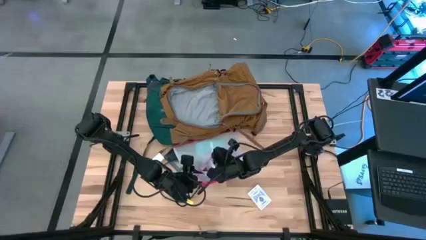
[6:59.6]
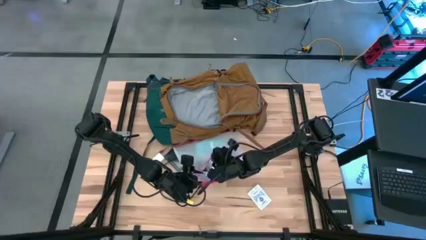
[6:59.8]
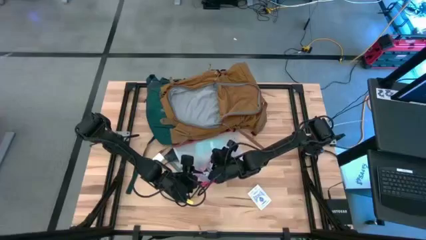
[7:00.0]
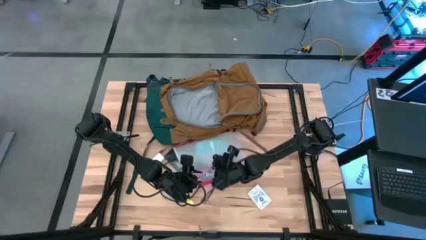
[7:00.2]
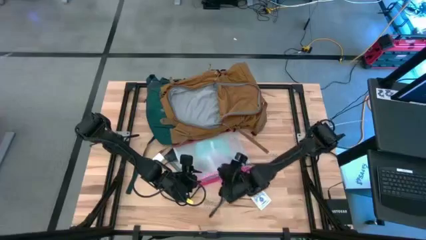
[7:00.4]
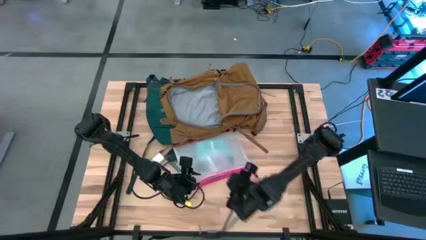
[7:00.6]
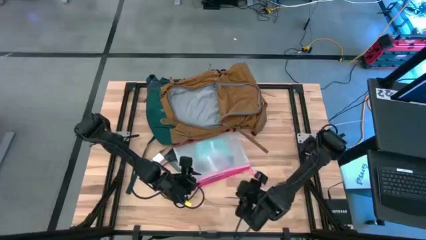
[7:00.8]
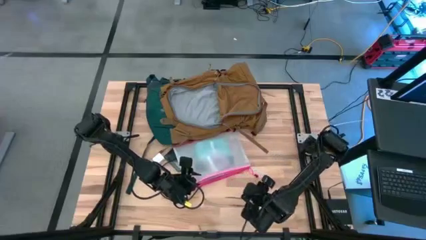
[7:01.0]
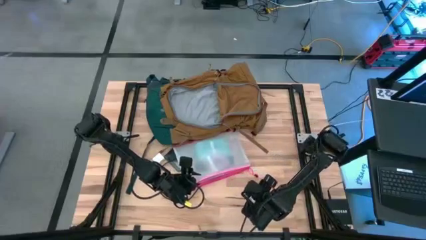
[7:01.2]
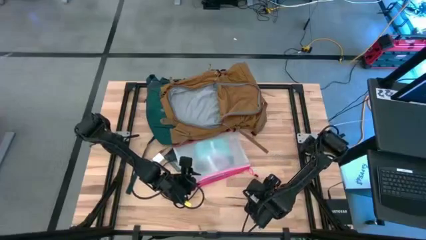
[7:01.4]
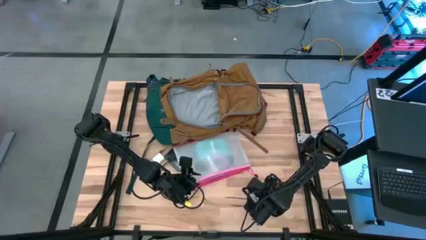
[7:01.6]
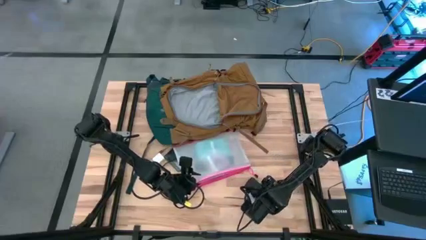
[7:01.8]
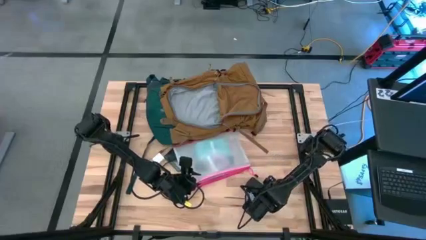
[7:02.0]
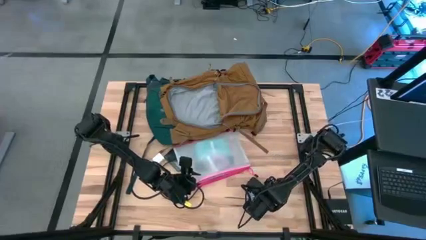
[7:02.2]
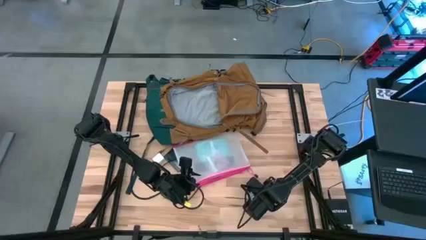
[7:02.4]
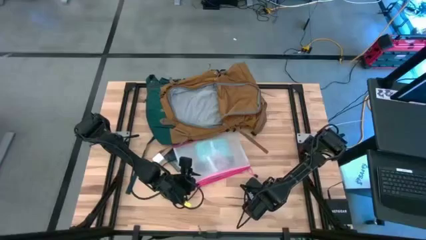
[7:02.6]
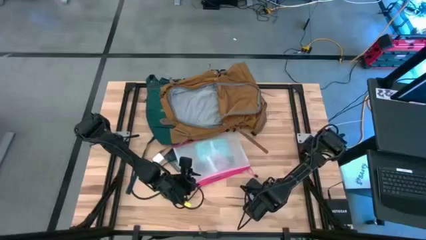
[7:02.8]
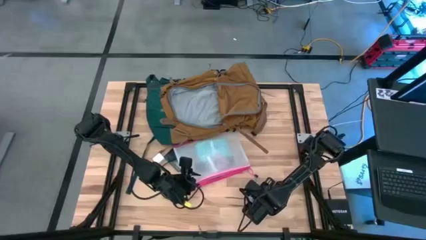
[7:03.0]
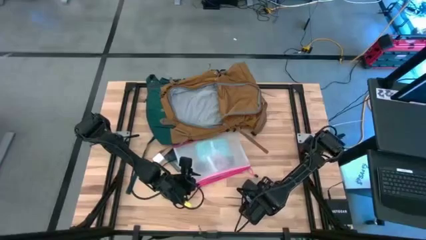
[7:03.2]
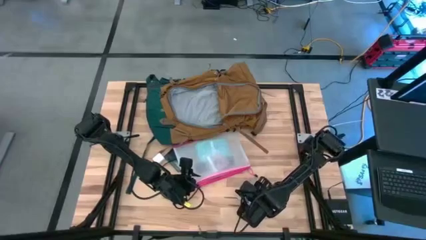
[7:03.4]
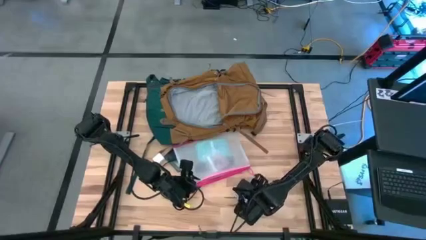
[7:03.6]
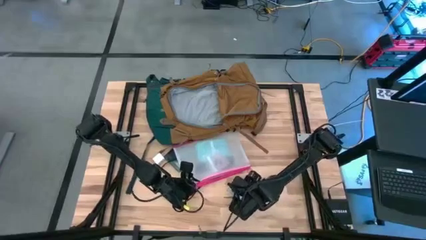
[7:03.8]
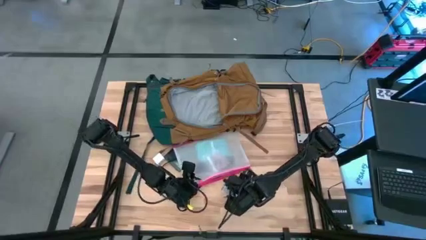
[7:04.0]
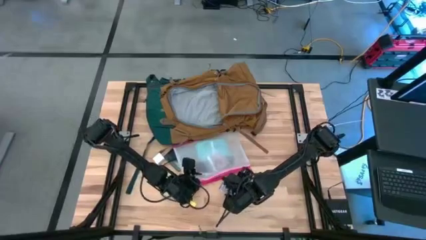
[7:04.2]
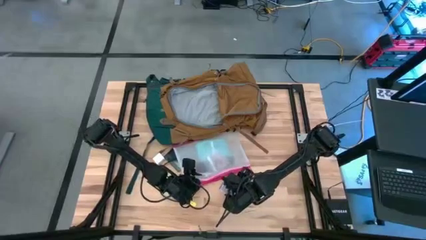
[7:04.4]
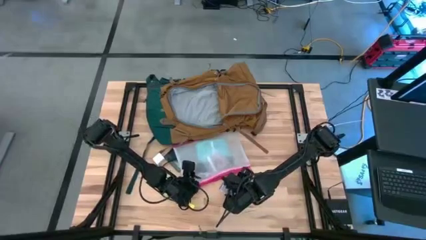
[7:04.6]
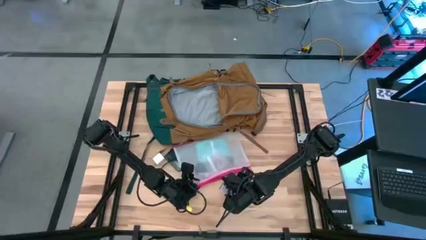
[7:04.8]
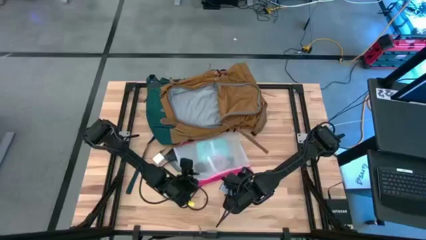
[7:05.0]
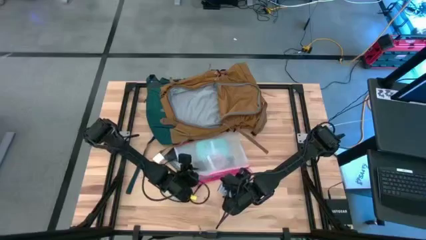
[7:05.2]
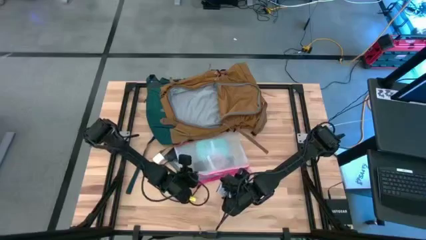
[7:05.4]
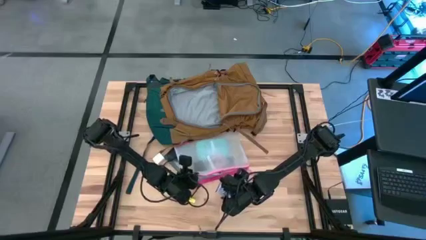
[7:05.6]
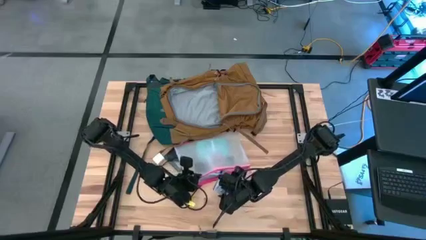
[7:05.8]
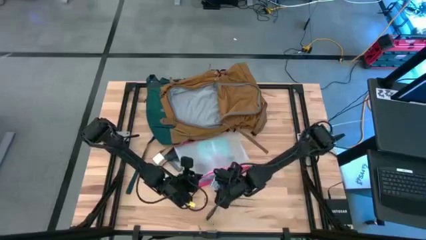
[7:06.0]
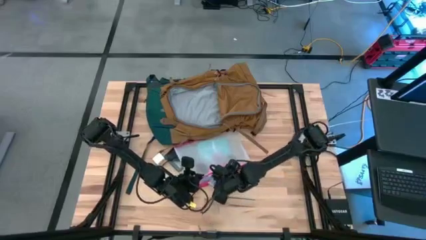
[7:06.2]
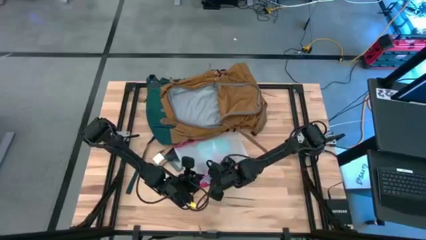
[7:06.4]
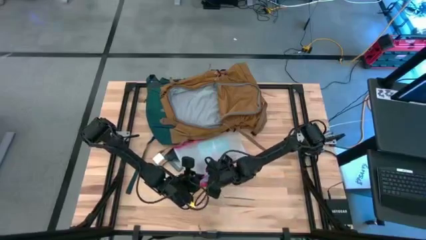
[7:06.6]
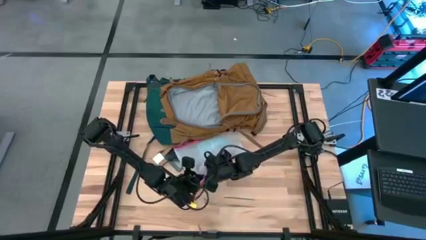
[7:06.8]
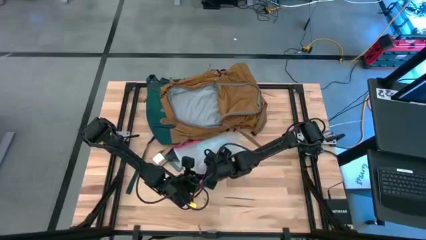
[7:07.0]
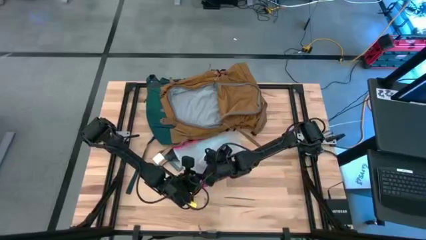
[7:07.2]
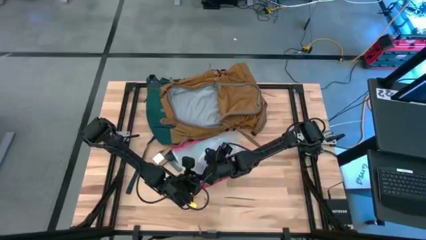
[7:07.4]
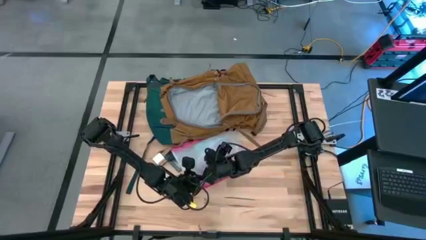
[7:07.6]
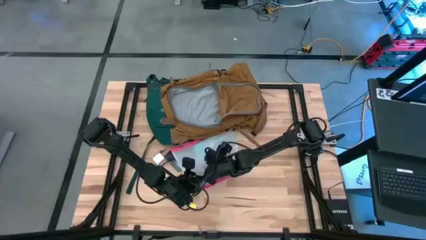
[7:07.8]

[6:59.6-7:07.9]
Task: Unpack backpack
Put the blue playing cards into the pink zipper pouch

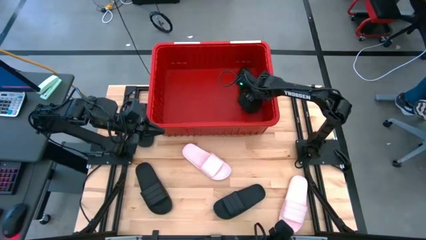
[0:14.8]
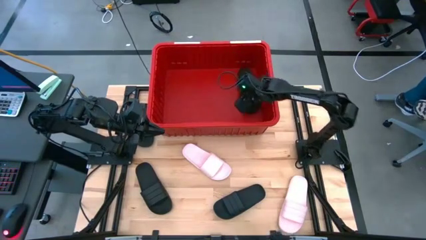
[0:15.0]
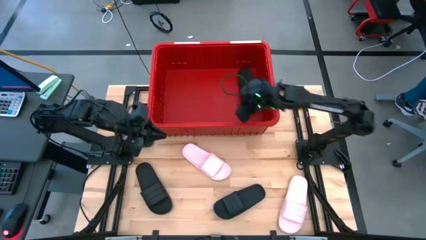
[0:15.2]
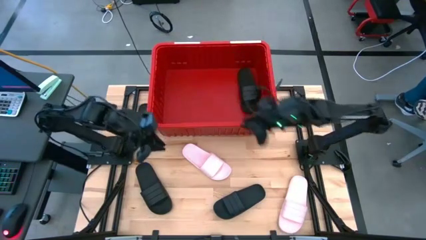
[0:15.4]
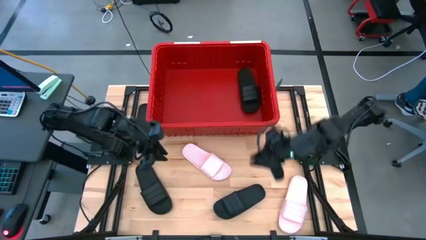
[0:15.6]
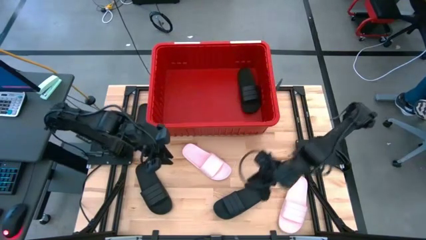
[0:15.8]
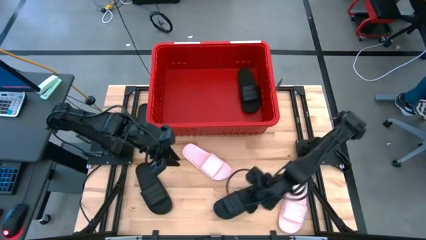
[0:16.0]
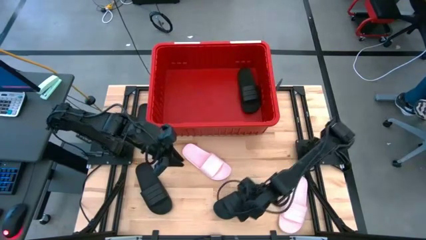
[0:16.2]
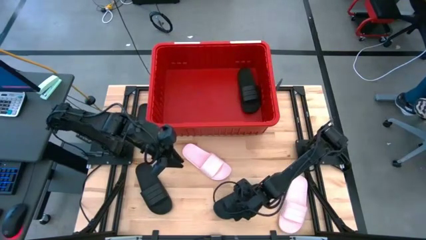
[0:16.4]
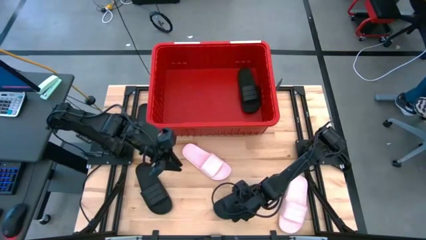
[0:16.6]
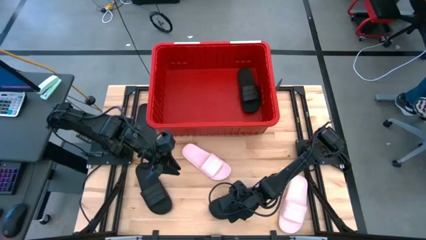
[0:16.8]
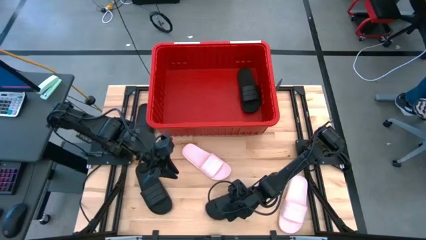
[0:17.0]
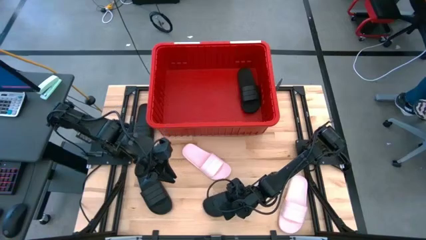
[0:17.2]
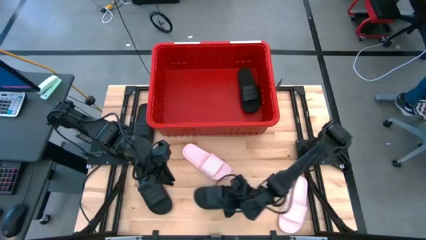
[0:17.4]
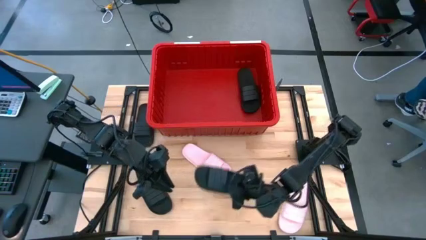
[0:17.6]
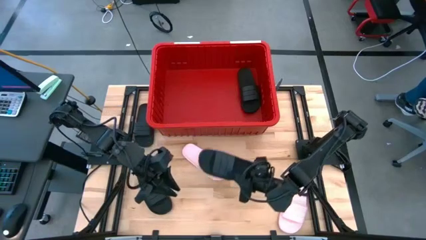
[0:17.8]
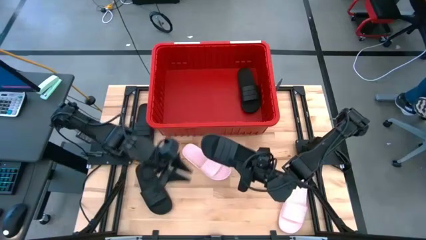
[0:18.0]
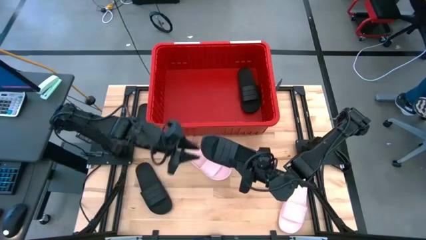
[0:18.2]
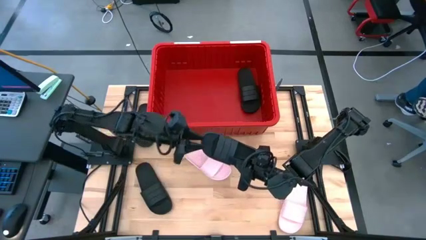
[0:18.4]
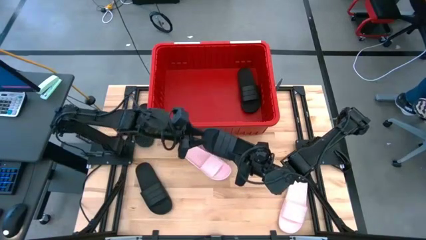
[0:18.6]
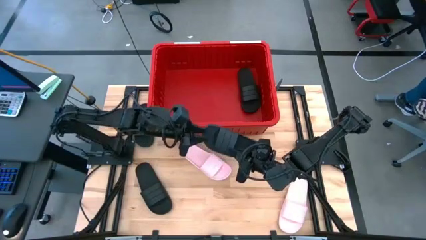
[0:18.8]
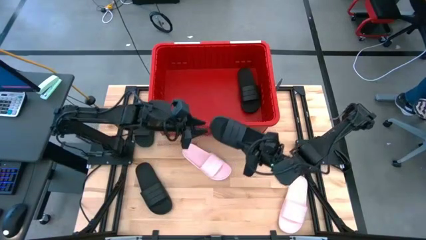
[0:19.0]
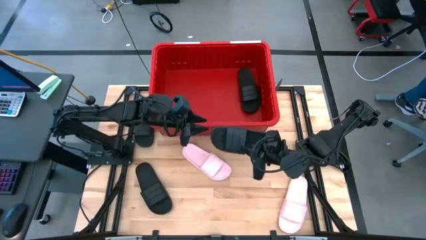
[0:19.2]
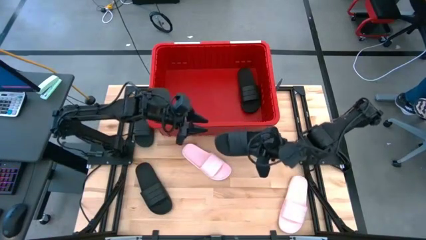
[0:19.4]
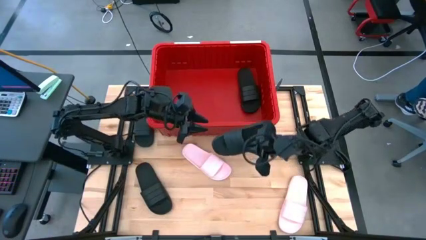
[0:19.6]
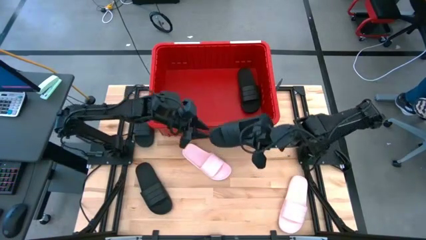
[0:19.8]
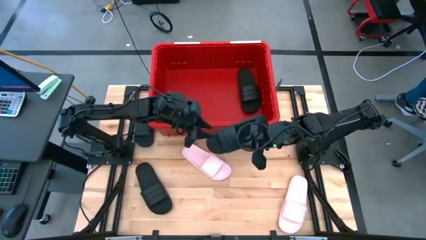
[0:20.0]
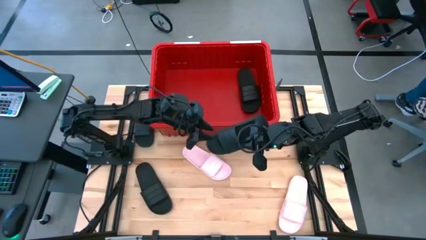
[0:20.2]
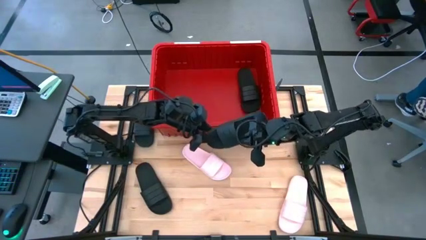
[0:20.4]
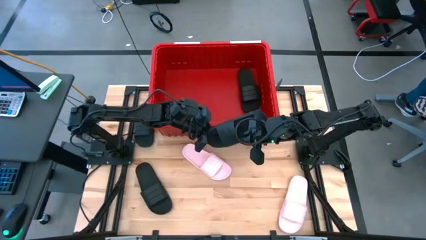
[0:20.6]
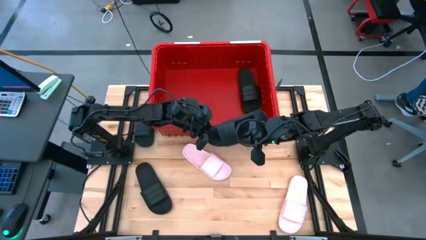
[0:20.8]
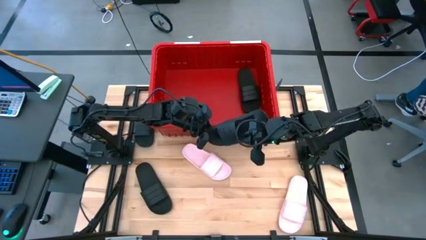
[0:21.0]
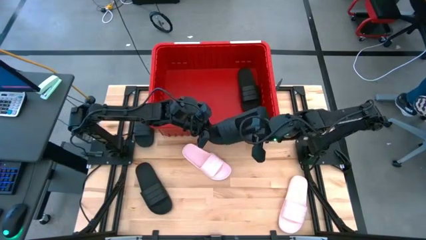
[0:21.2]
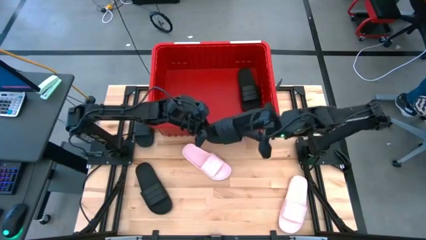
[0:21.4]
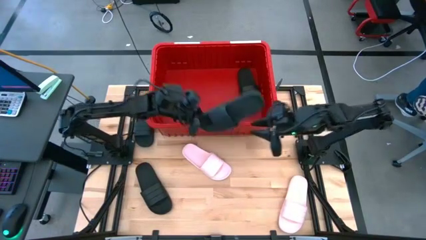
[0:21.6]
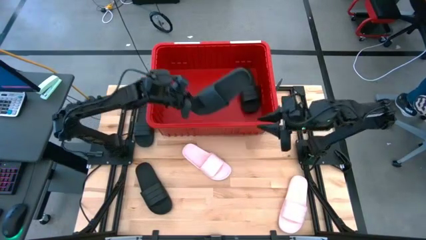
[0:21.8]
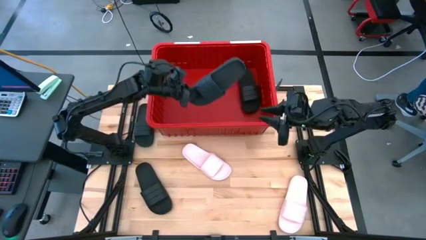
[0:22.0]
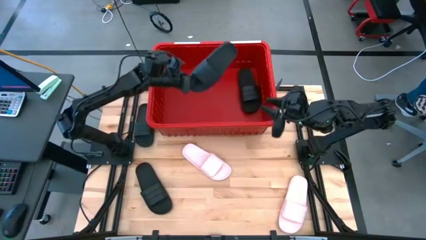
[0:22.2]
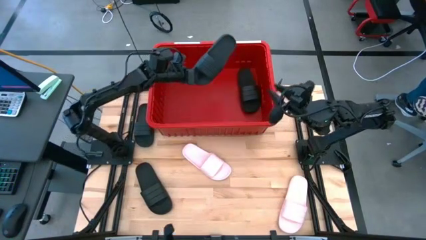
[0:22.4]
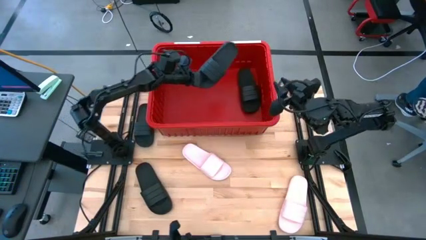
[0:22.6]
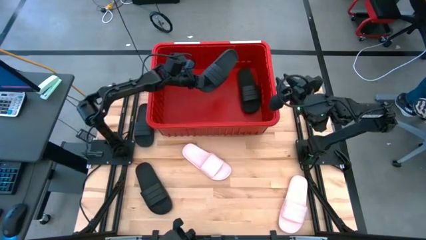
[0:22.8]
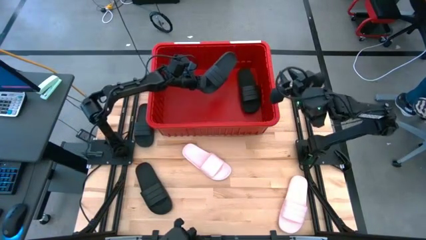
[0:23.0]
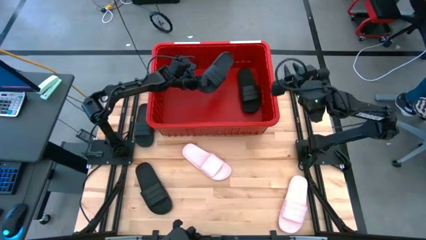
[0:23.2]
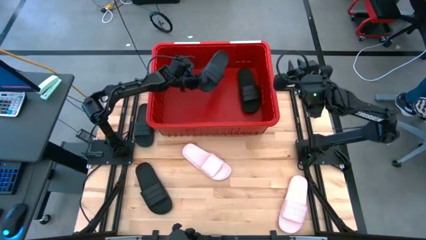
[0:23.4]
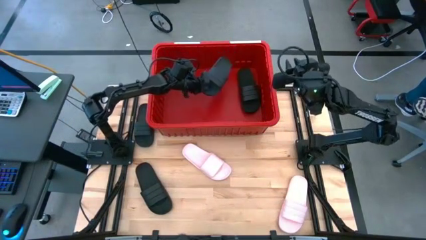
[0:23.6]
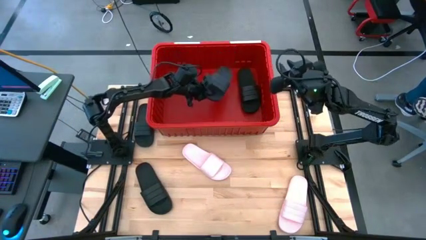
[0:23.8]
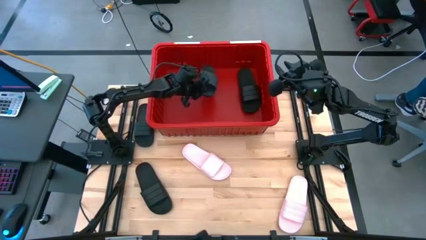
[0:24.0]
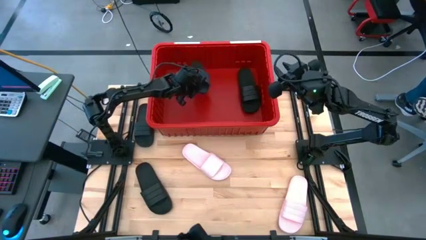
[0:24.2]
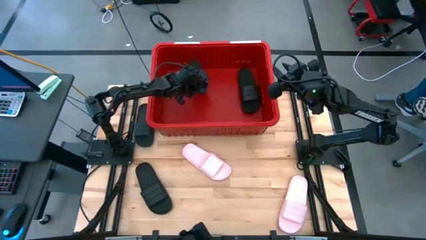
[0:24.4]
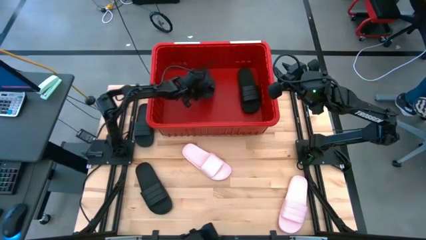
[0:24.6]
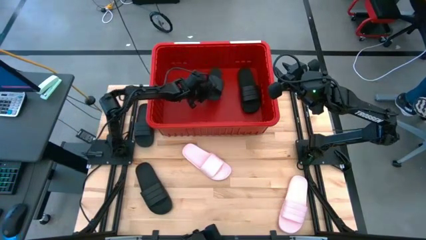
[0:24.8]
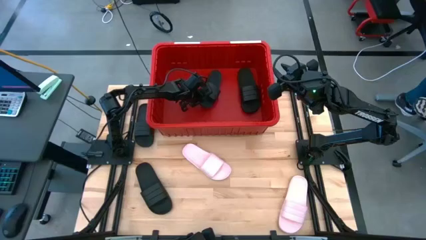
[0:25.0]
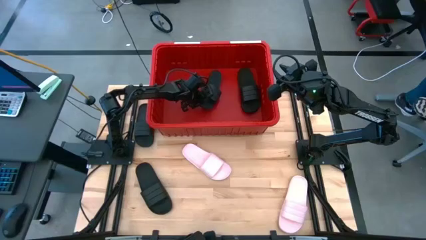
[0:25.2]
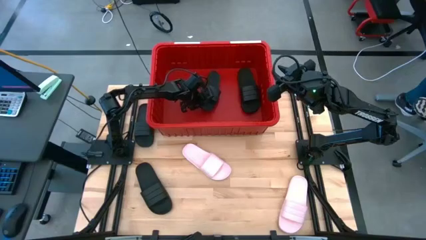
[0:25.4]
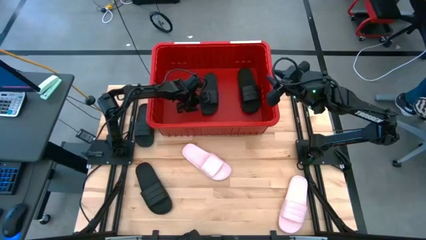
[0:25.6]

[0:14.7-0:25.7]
Task: Pick and place slides into bin
Put the black slide into the red bin
